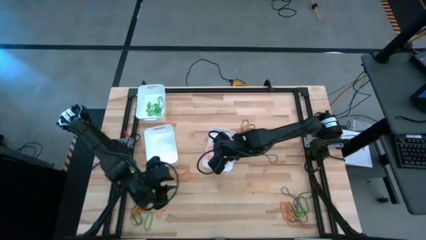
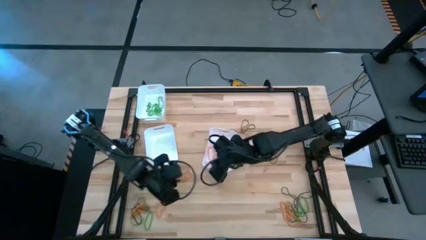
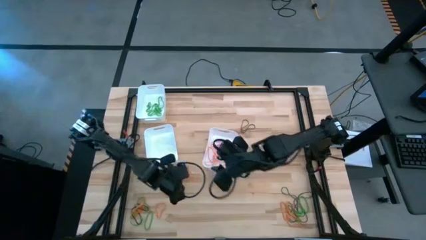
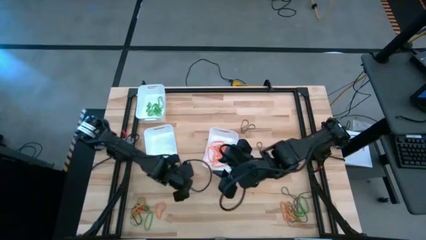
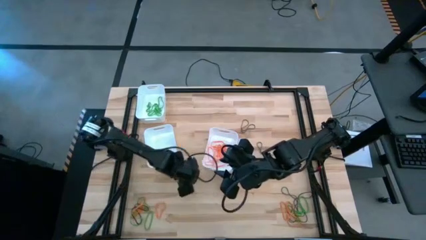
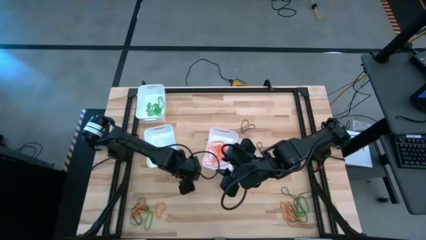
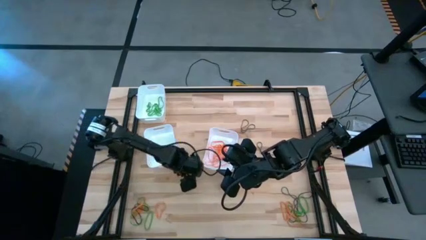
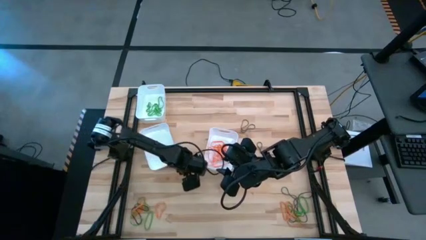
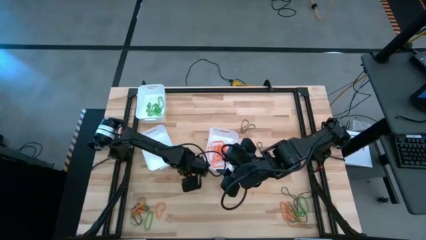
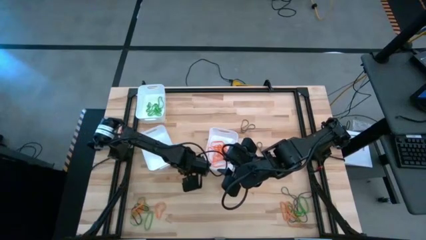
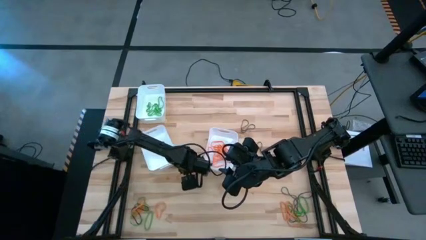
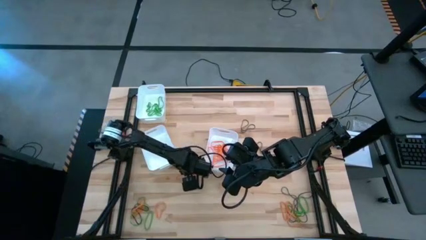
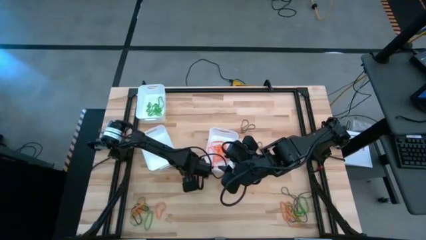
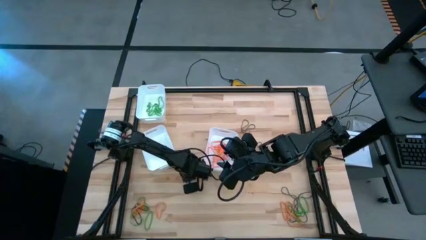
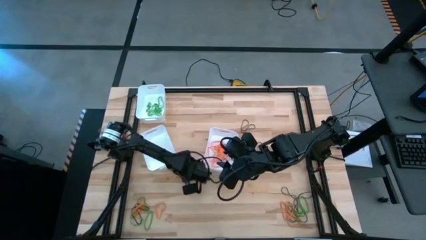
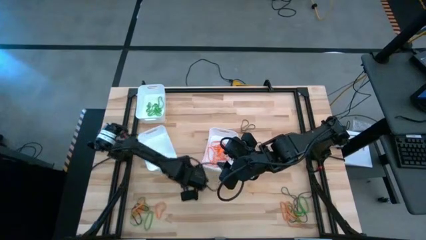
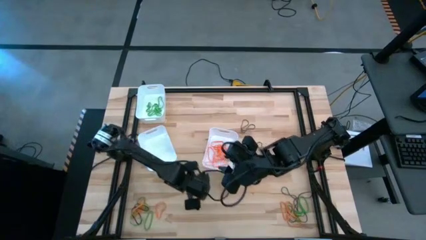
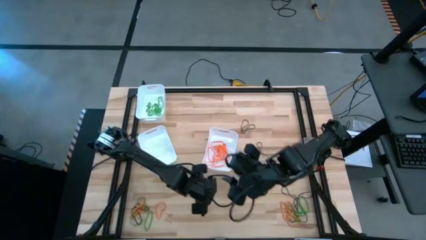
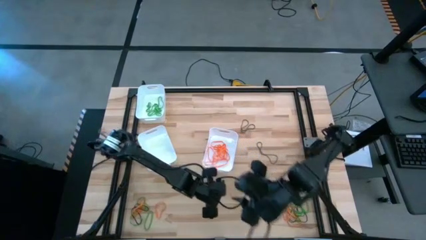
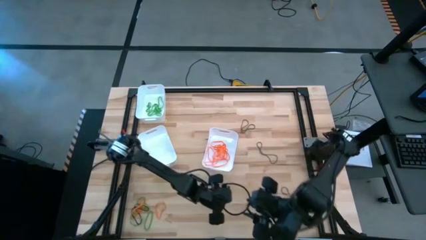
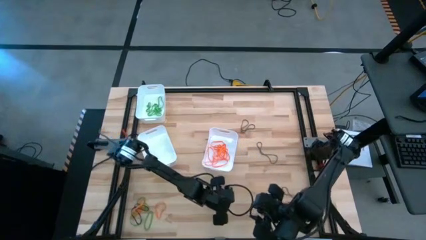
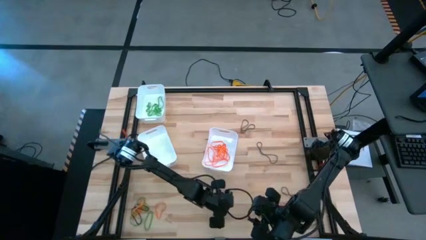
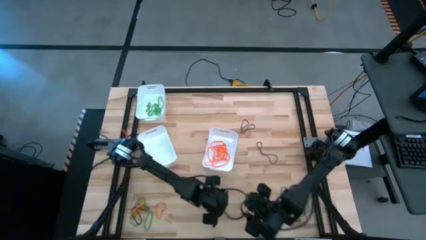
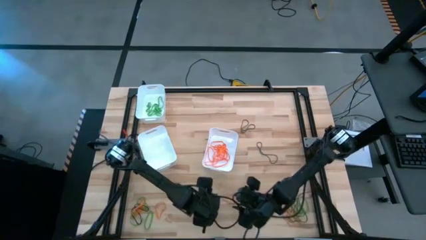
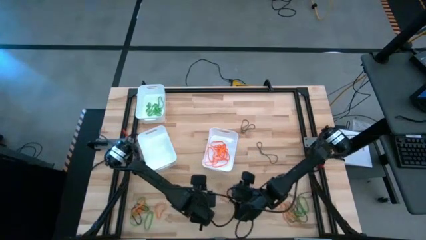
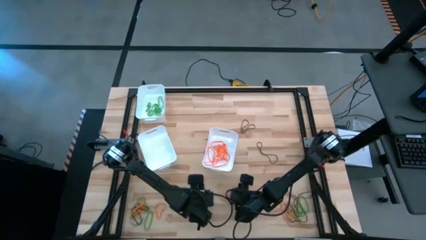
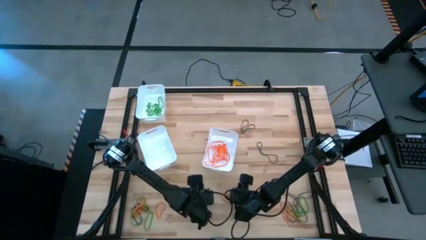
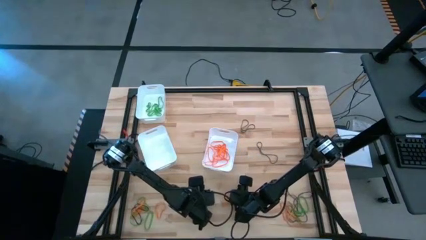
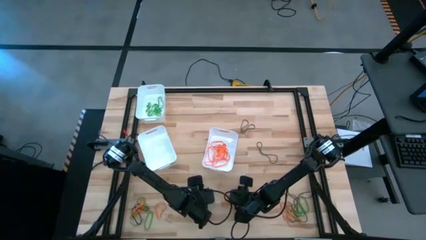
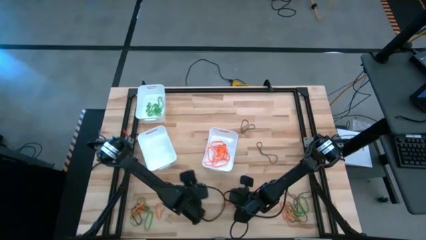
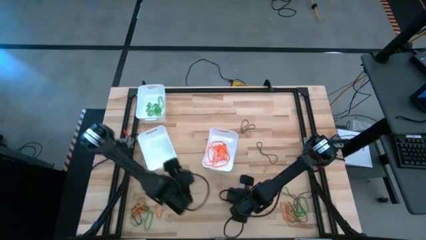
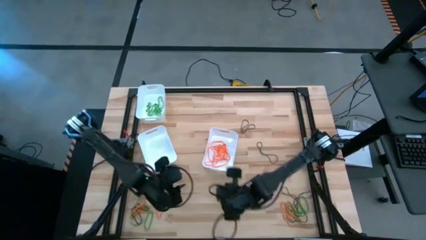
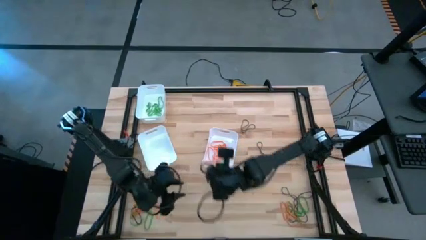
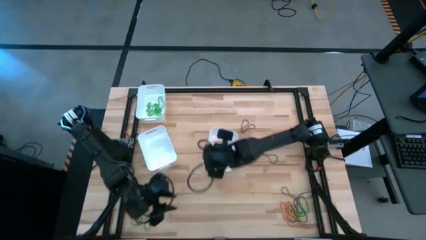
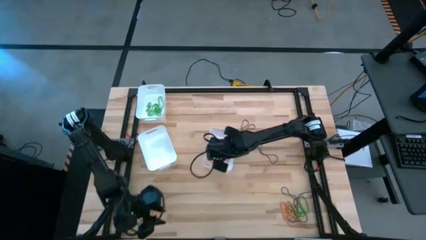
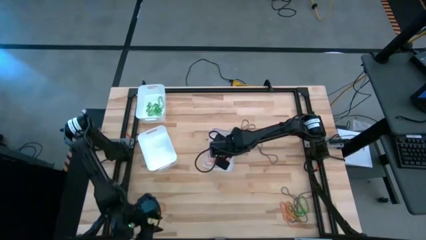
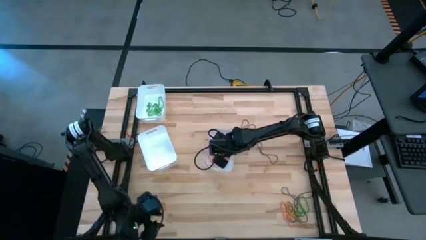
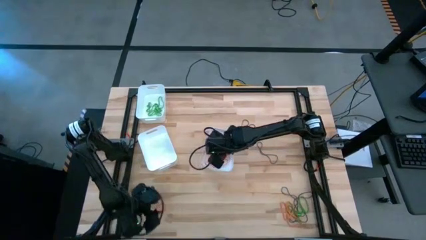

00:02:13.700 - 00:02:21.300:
Task: Sort rubber bands into baskets
Put the orange rubber band into the bottom right white bin

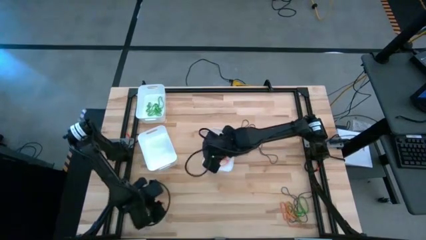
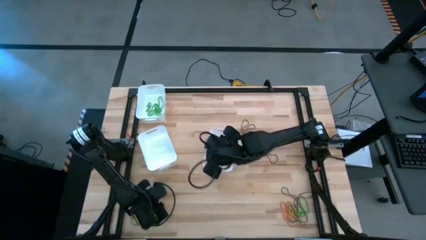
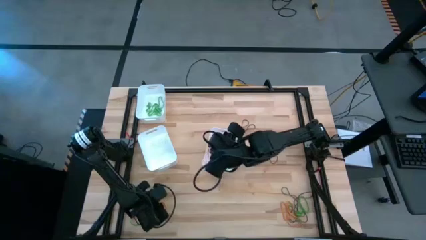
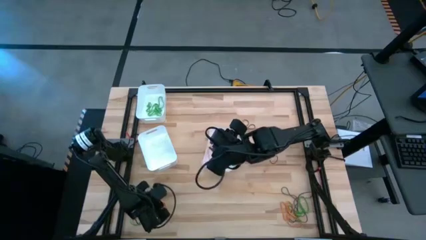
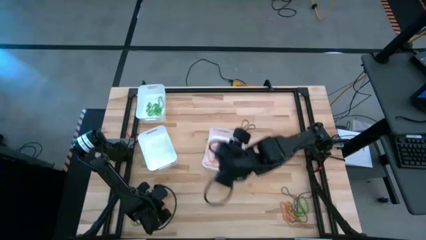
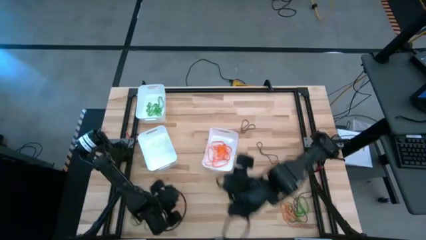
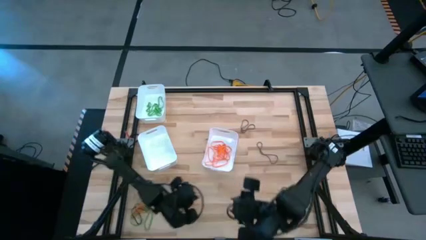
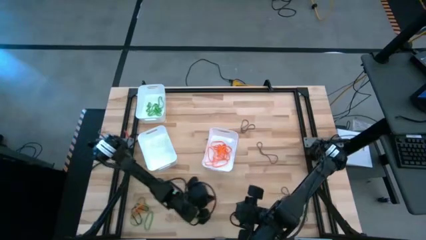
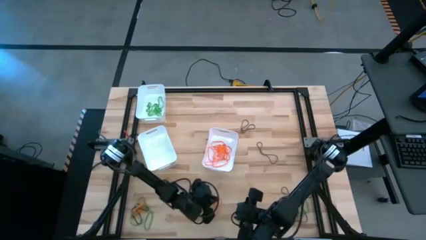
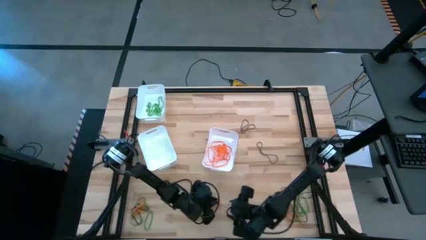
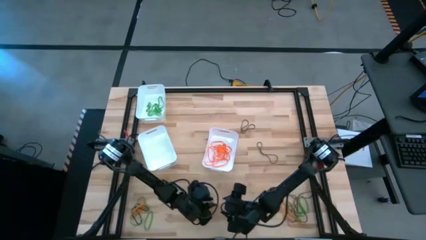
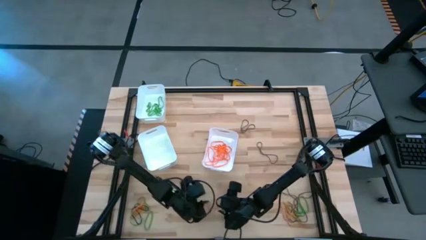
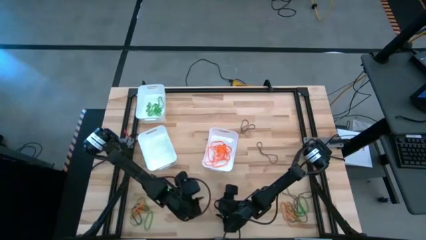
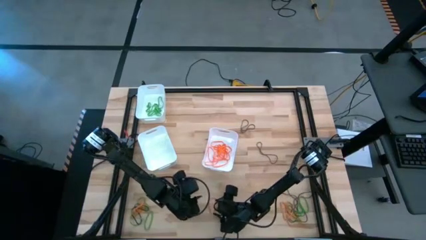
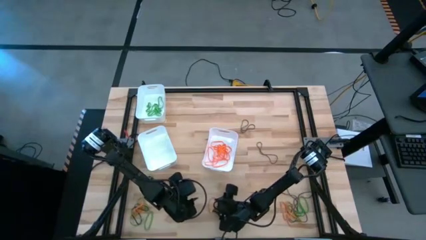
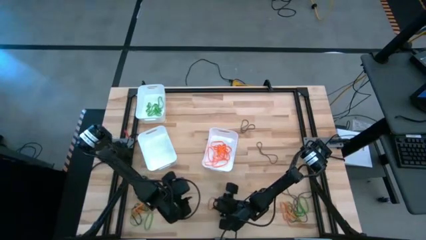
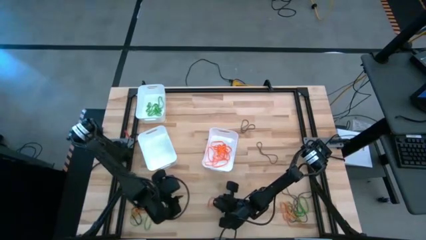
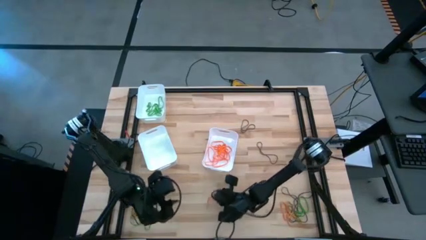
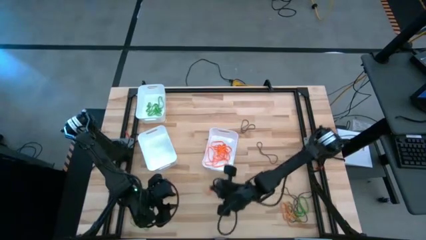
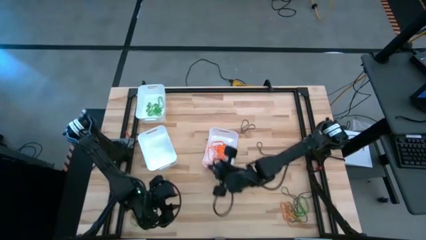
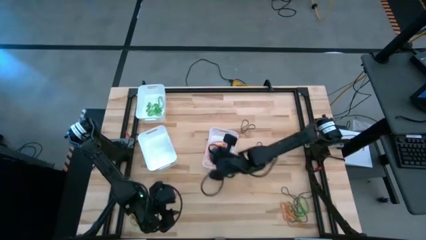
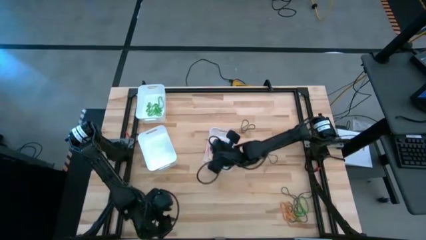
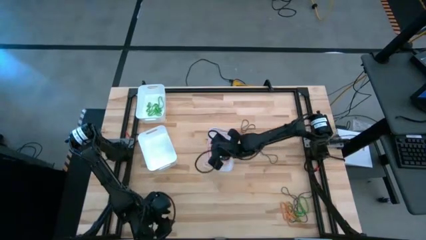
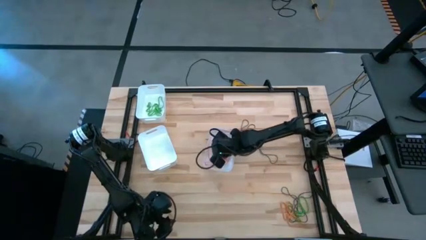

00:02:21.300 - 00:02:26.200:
Put the orange rubber band into the bottom right white bin

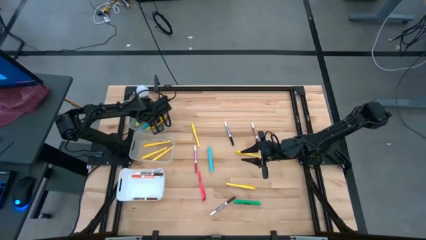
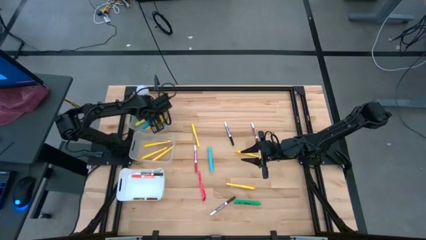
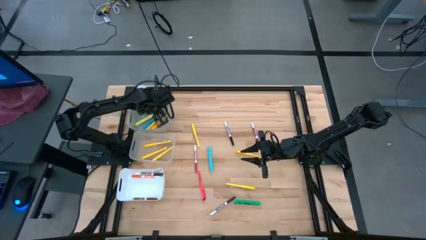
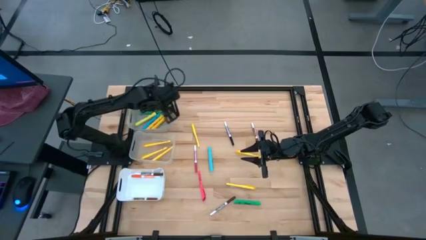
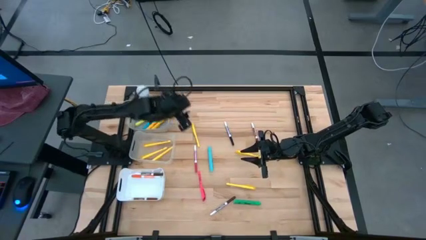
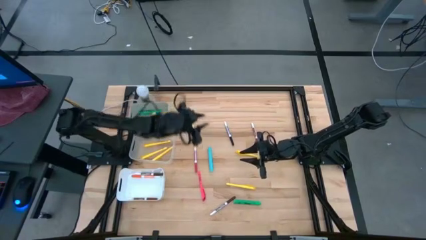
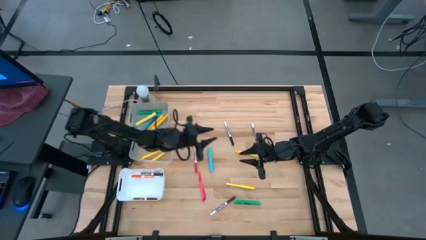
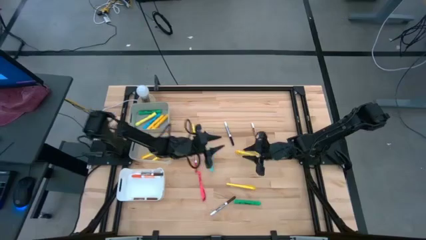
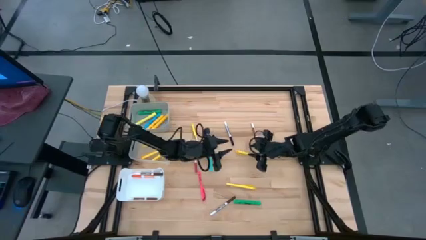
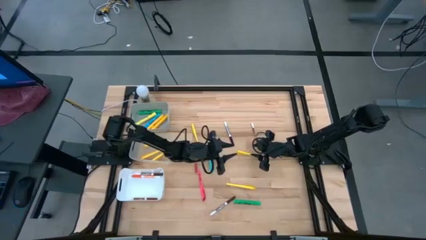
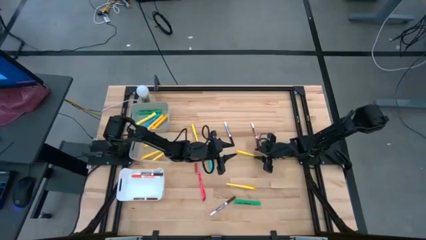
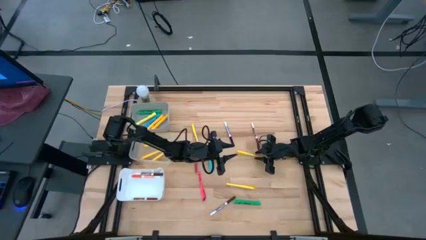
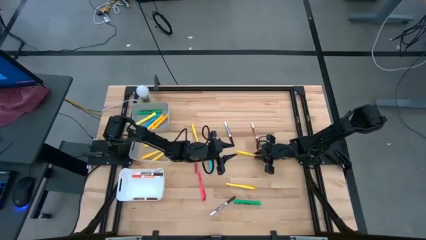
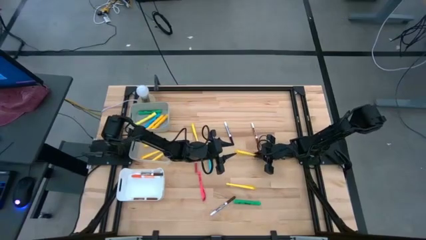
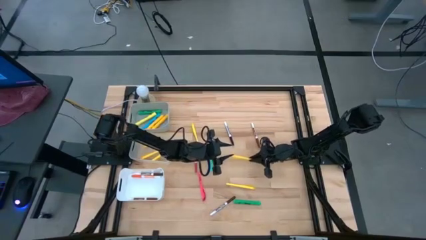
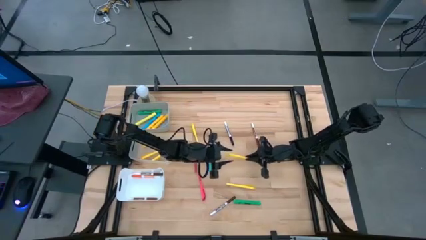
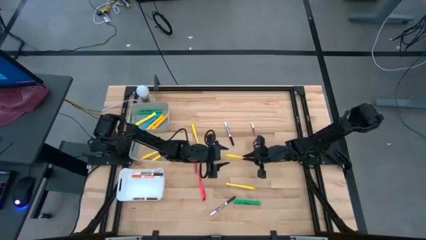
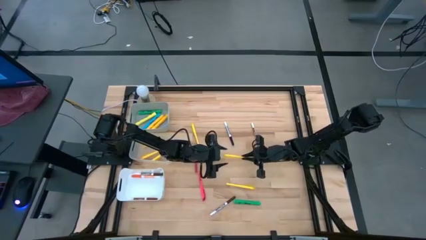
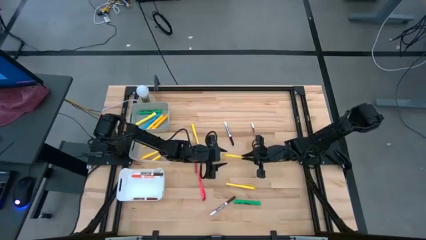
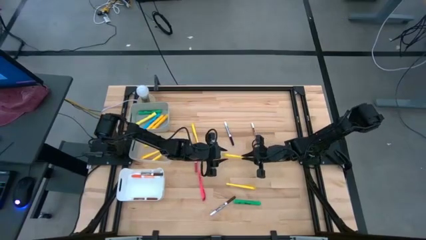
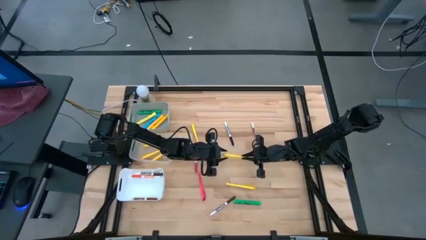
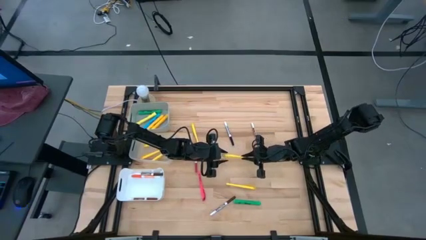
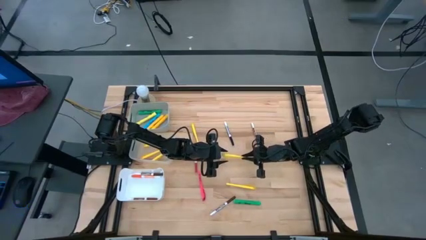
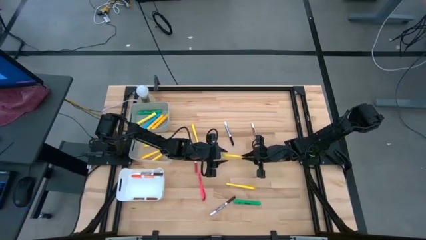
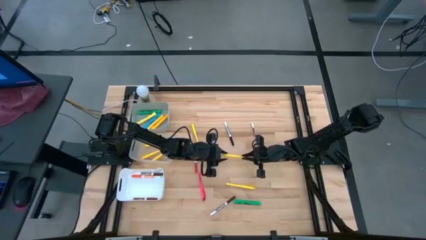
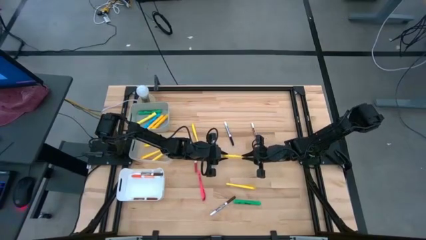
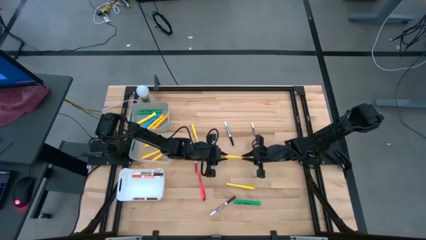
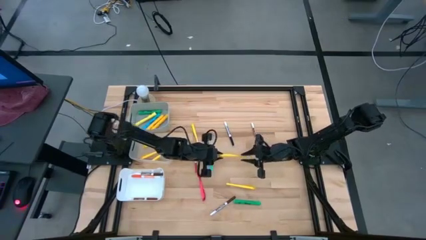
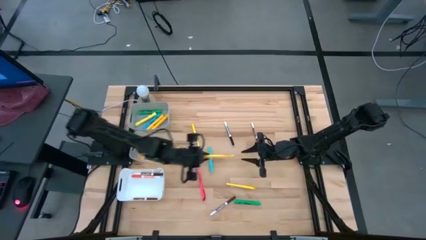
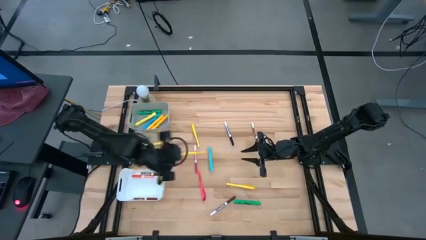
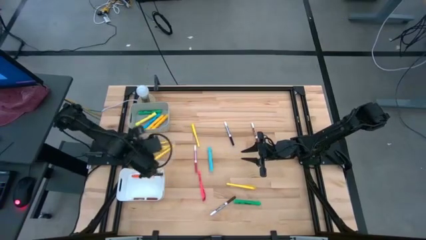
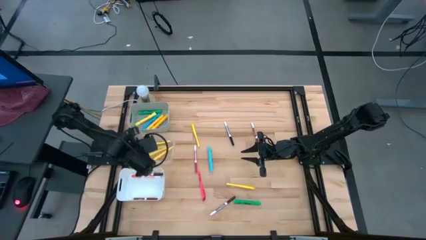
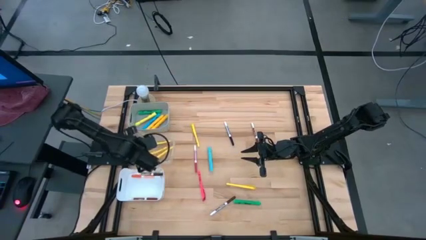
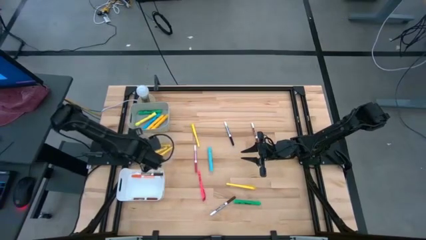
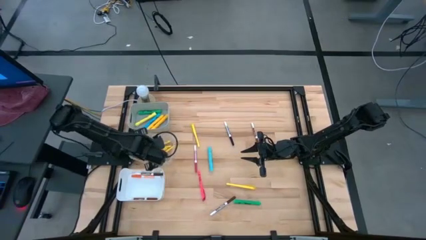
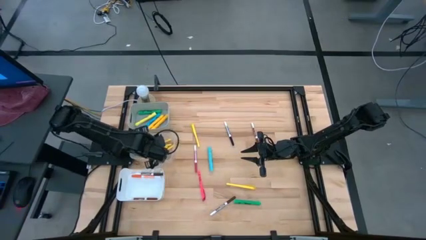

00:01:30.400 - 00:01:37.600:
Task: Pick & Place Markers
Put the yellow pen into the transparent bin
